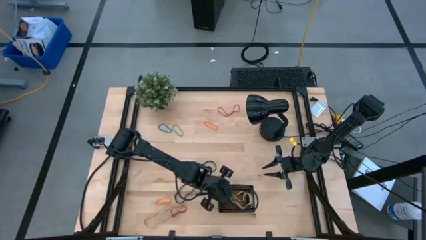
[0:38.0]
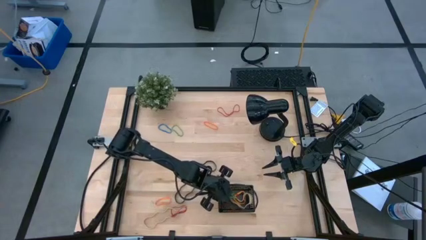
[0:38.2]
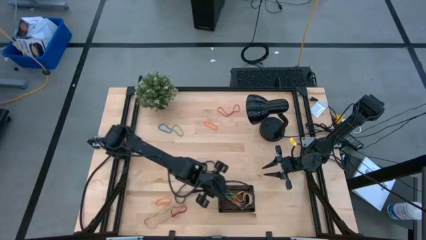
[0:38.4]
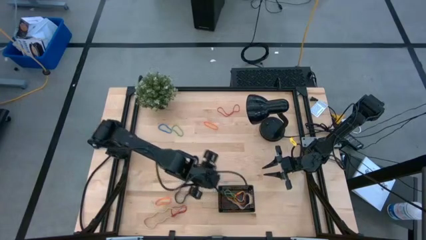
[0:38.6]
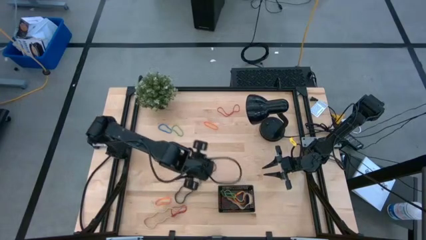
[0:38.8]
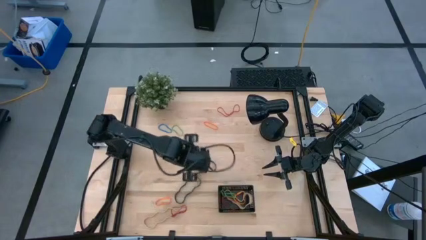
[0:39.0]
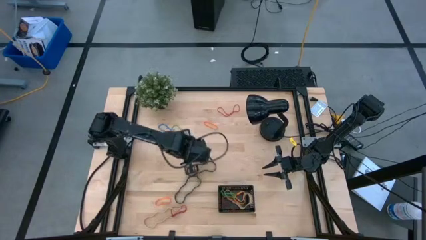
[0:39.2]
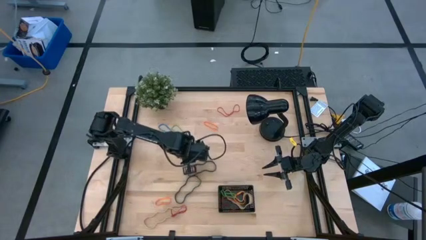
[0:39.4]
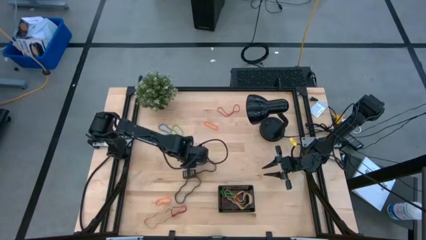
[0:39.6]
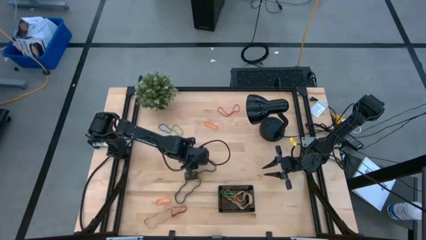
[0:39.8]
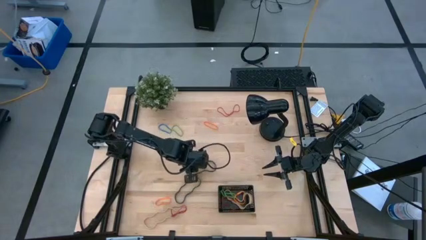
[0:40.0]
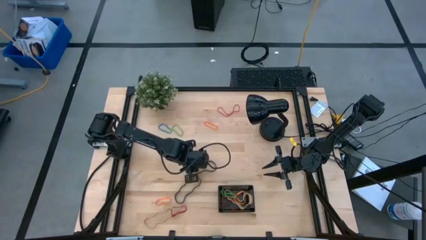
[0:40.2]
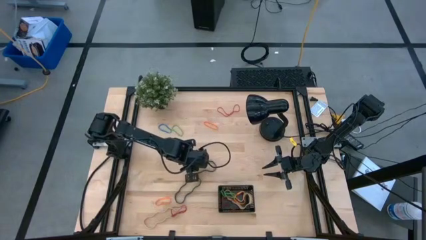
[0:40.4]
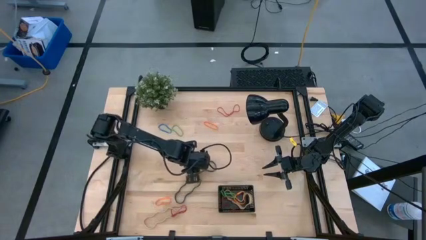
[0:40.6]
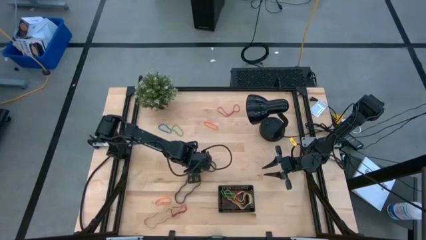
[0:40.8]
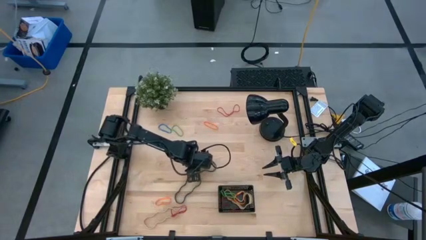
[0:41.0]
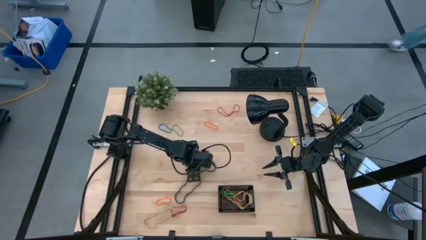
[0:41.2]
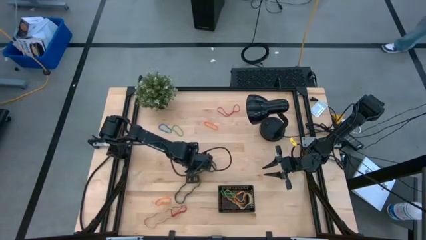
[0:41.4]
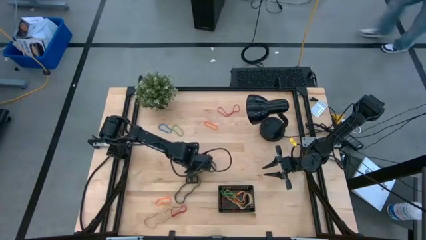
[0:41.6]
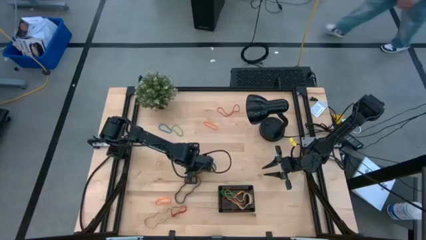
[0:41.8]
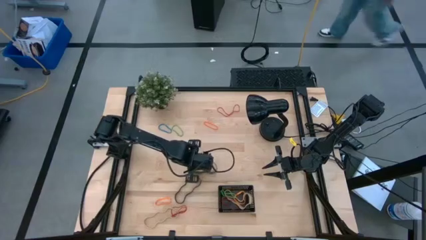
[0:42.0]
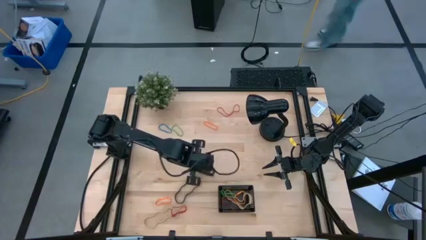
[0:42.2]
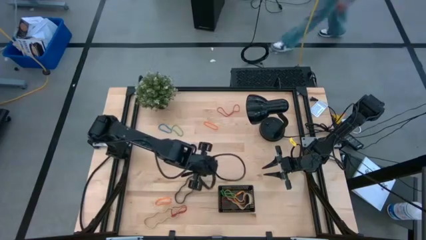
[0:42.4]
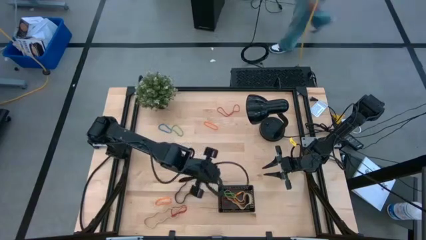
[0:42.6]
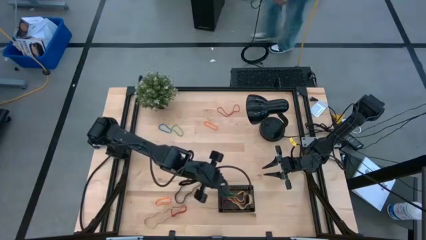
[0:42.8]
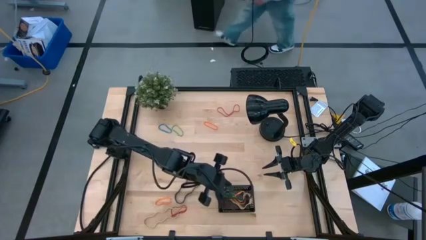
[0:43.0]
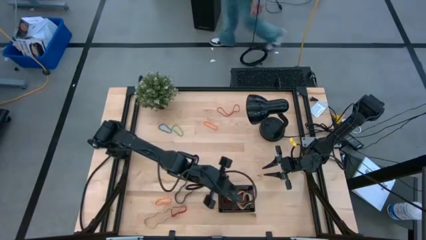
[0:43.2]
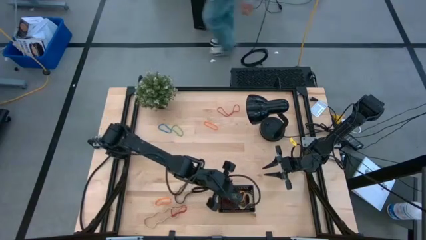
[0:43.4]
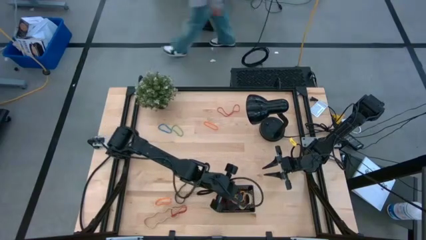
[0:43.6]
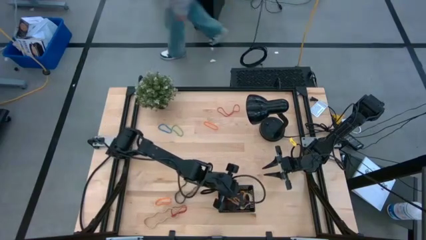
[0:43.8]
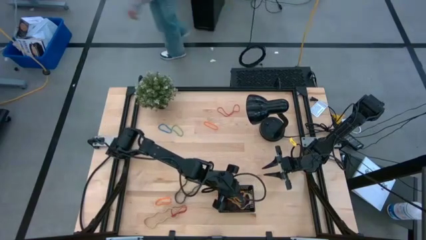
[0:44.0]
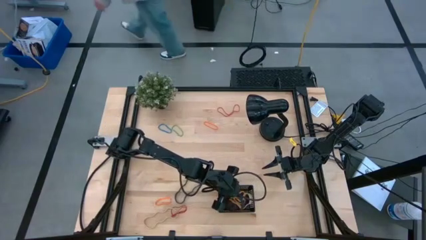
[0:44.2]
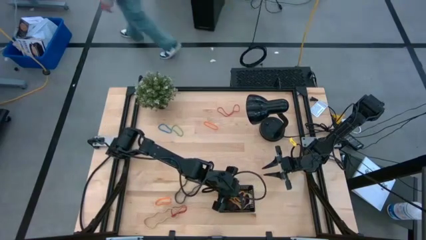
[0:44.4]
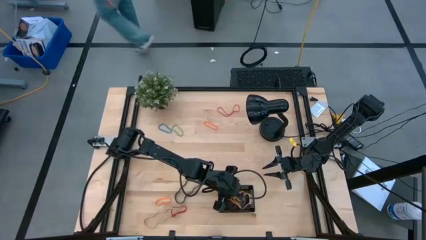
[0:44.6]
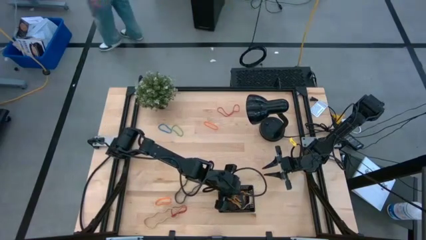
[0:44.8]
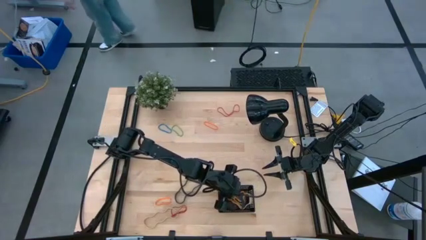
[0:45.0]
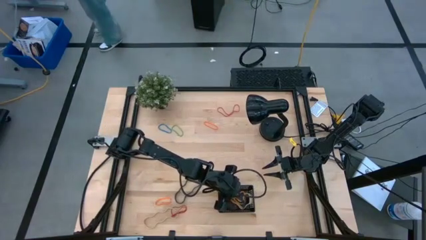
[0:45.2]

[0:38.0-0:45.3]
Task: Pick and place rubber bands into bin
Put the top black rubber band into the black bin

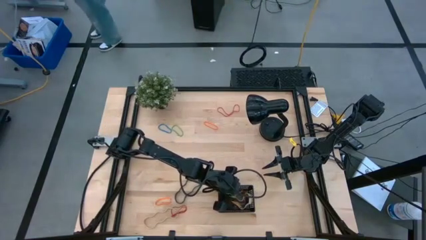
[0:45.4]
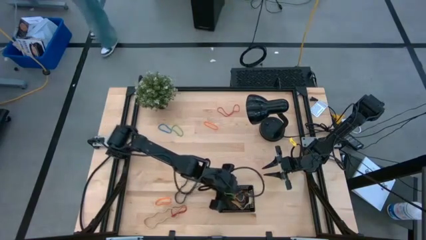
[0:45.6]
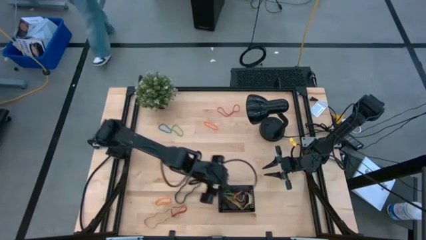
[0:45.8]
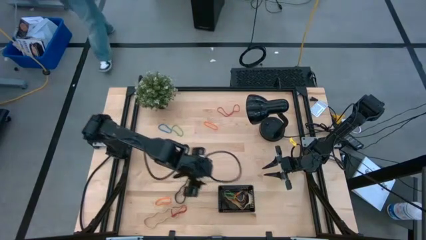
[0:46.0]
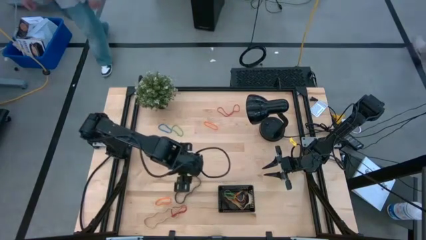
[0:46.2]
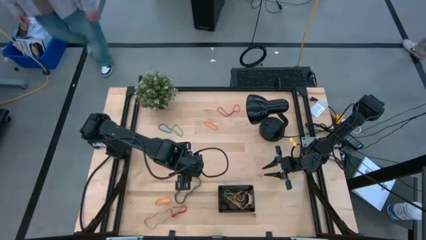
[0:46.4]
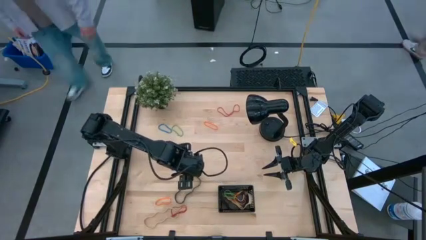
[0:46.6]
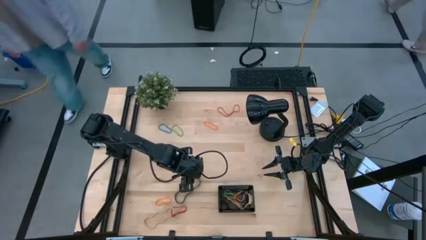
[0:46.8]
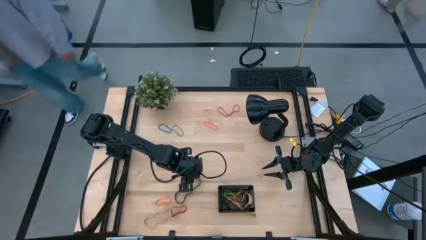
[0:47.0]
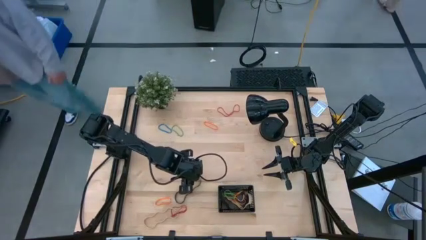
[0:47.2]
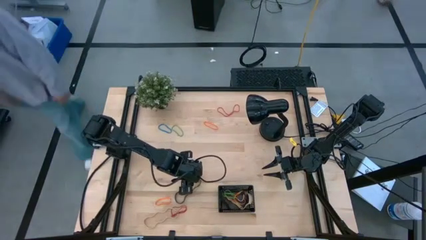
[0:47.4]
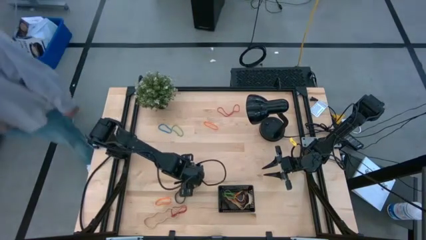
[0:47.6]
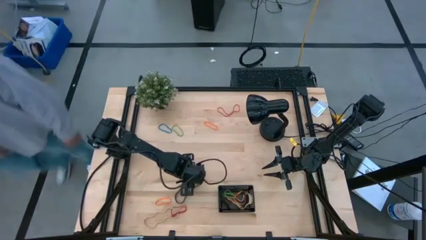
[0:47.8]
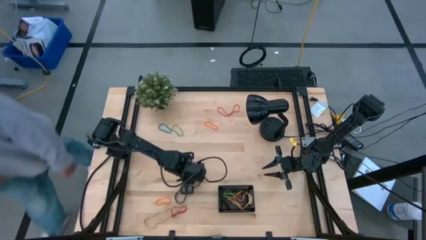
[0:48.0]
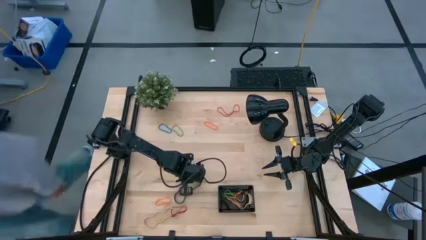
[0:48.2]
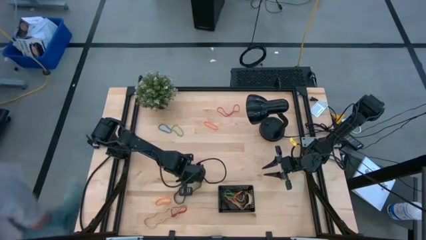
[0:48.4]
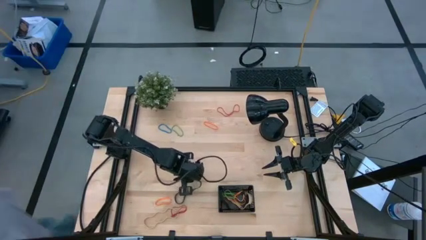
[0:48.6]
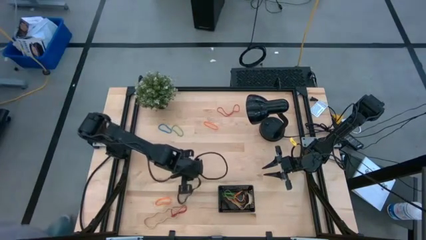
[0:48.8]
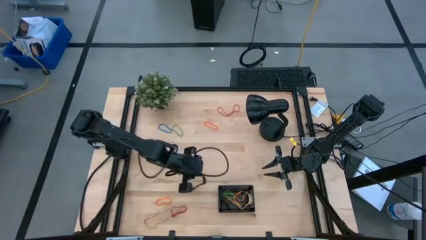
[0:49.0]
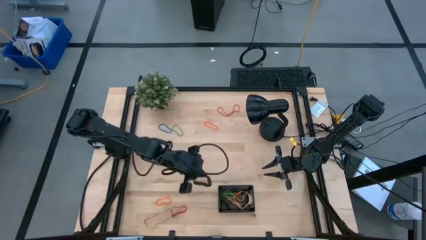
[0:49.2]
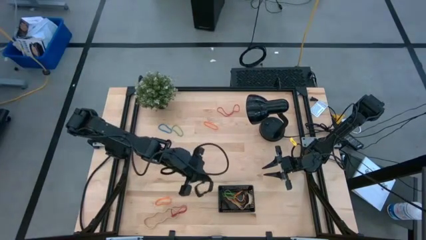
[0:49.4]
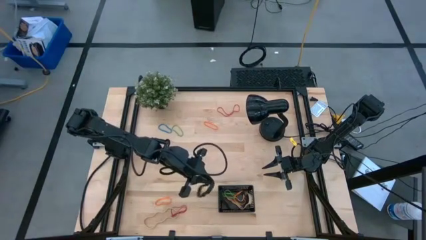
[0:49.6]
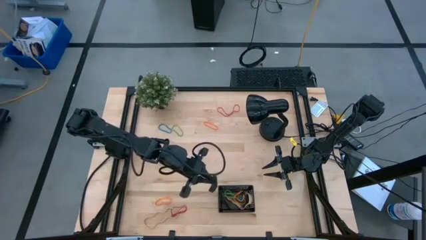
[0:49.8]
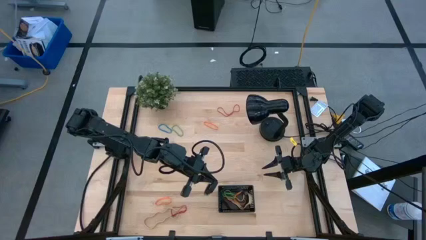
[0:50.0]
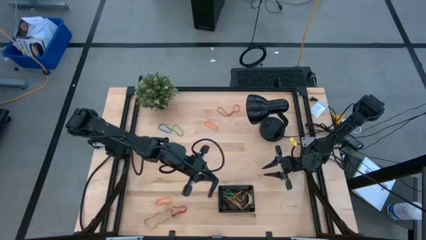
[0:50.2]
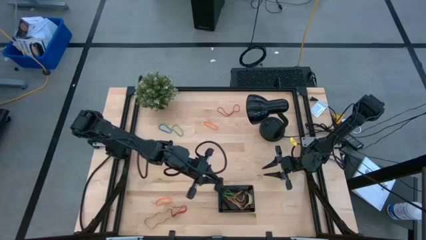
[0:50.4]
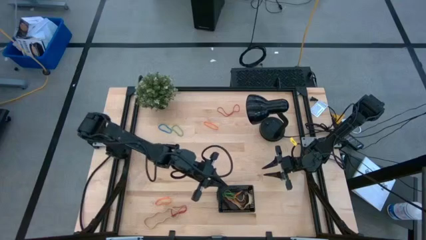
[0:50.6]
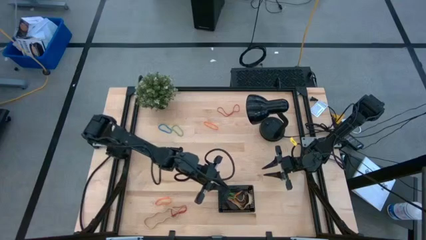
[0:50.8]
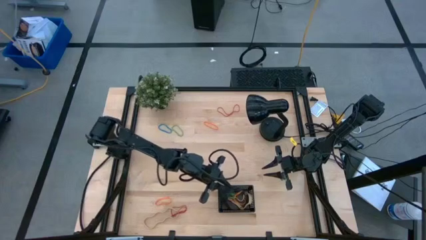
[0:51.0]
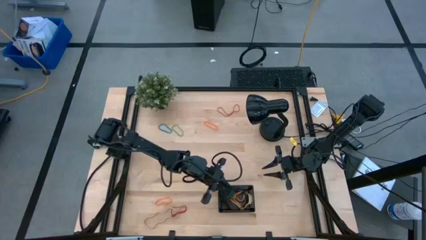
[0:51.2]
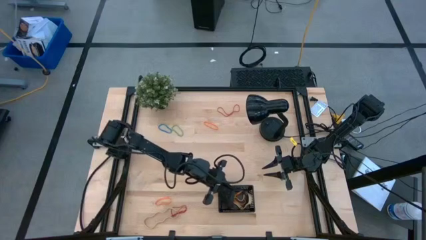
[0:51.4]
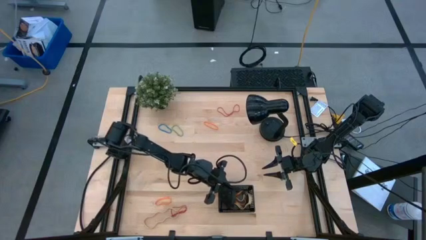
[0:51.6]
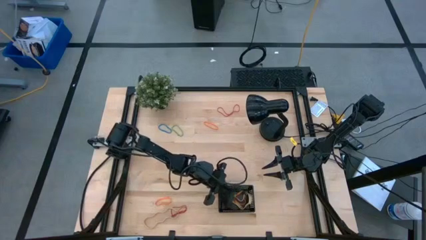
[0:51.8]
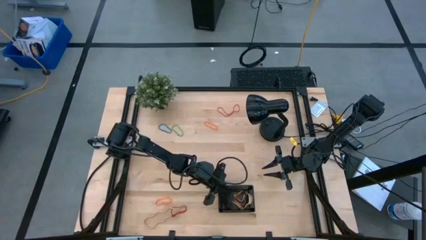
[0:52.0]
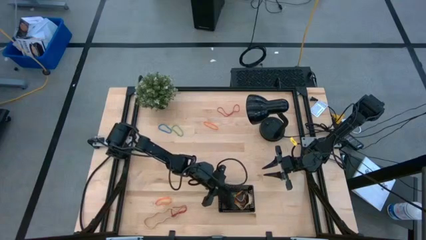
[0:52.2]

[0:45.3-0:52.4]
Put the black rubber band into the black bin

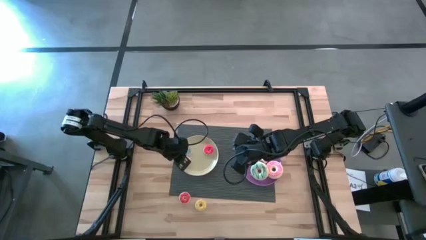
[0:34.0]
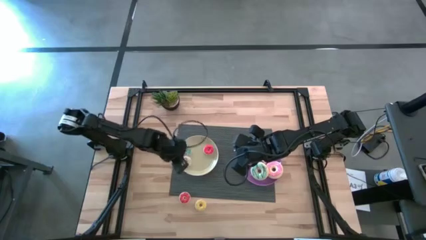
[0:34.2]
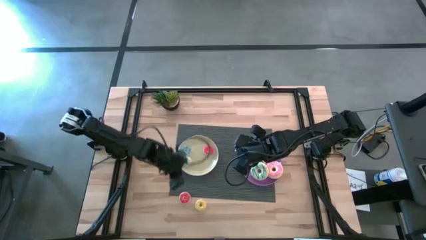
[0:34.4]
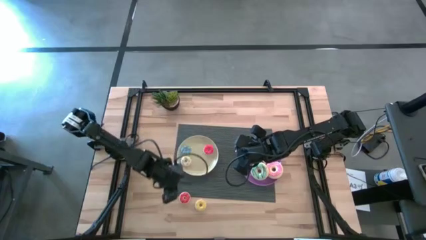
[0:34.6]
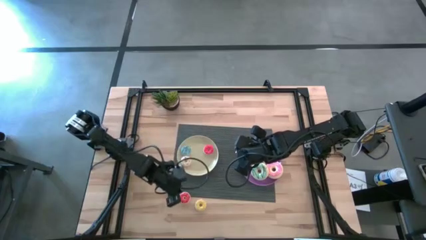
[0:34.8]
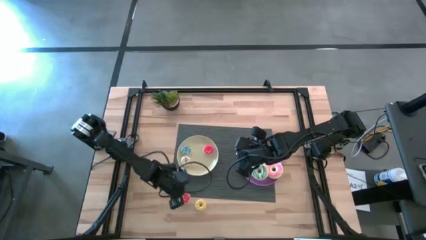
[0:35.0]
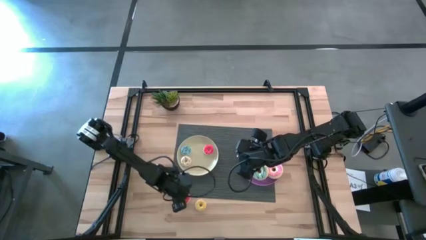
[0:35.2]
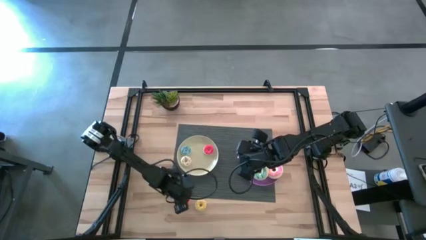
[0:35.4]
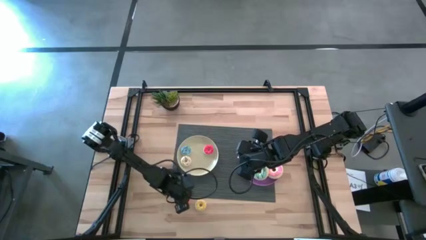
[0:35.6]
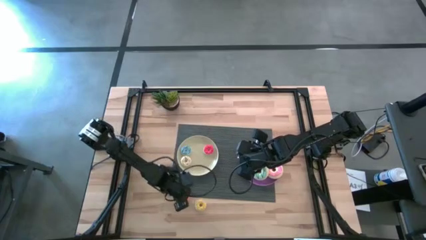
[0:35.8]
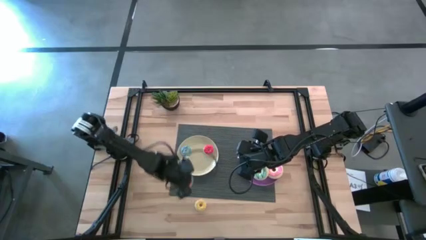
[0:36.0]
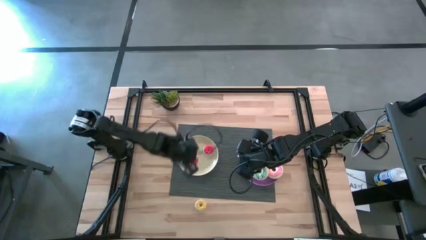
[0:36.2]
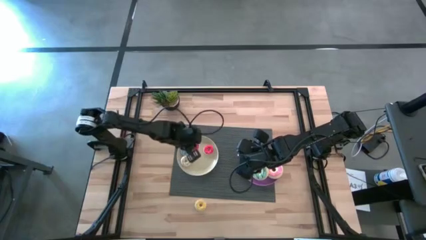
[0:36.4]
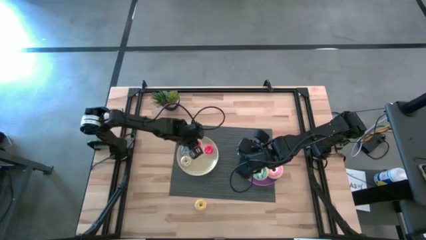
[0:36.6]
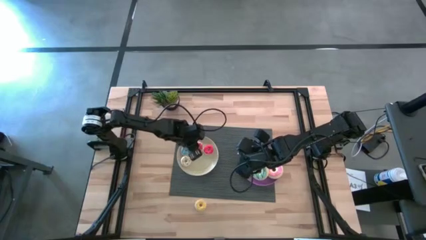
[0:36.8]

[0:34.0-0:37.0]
Task: Pick & Place donuts
Put the small orange donut on the white plate
